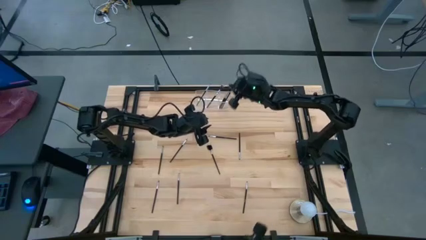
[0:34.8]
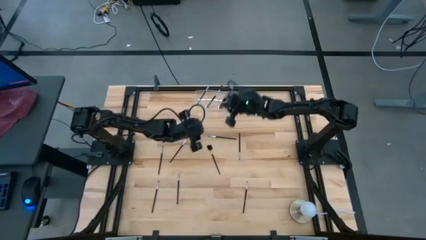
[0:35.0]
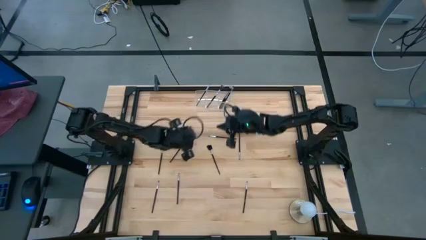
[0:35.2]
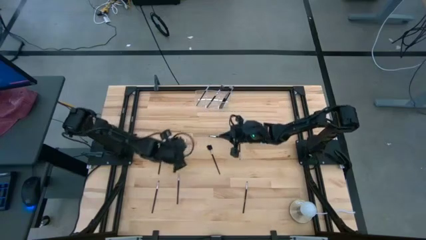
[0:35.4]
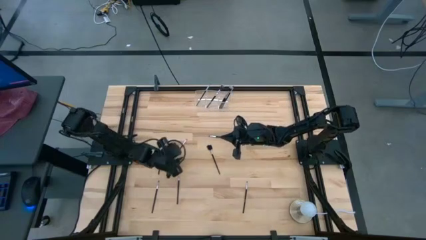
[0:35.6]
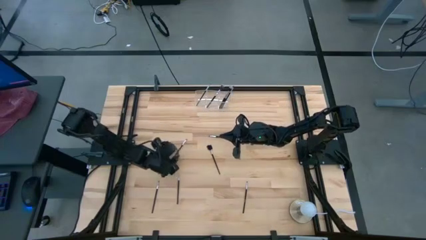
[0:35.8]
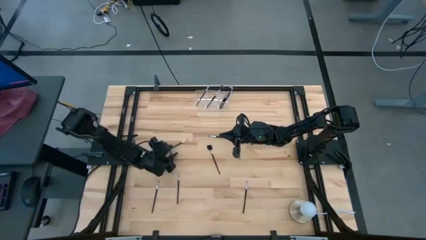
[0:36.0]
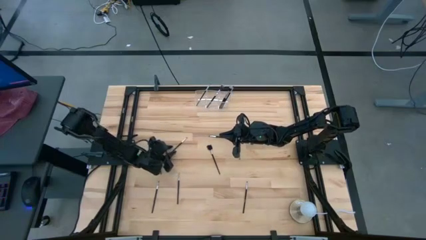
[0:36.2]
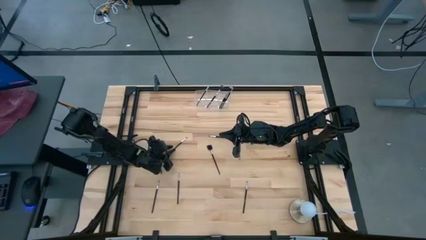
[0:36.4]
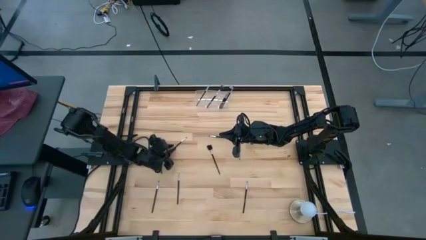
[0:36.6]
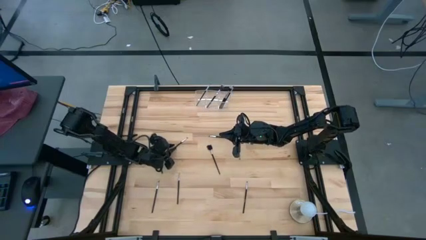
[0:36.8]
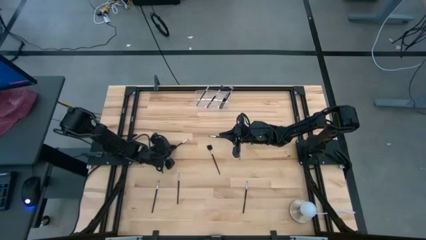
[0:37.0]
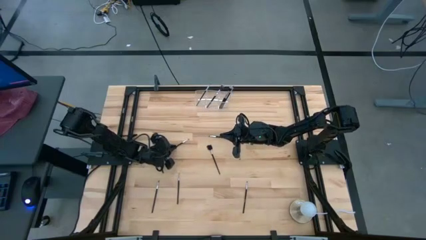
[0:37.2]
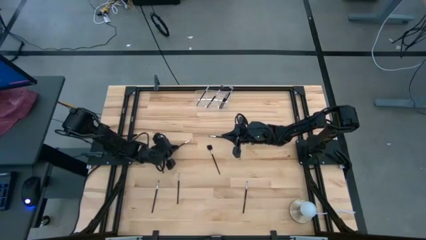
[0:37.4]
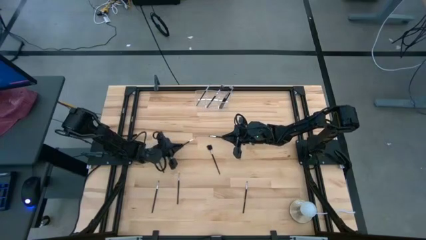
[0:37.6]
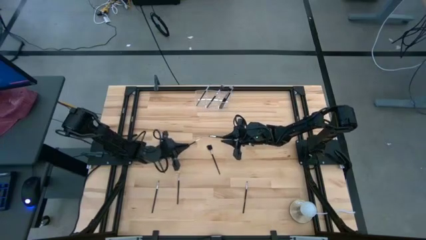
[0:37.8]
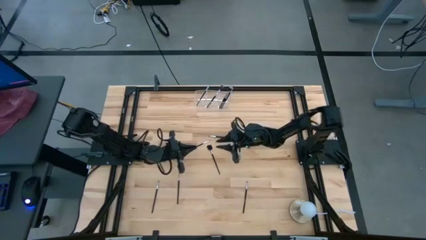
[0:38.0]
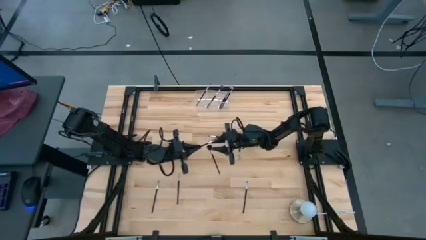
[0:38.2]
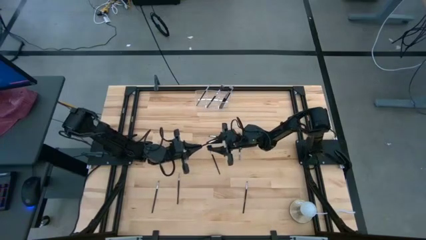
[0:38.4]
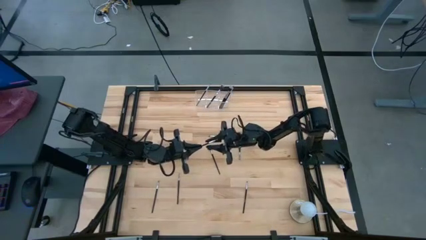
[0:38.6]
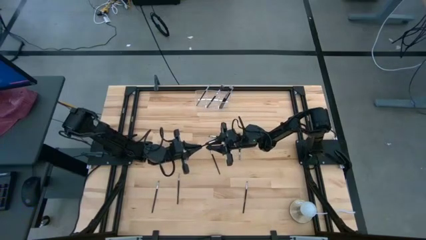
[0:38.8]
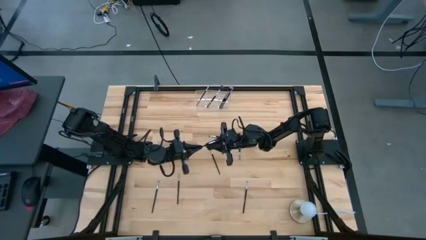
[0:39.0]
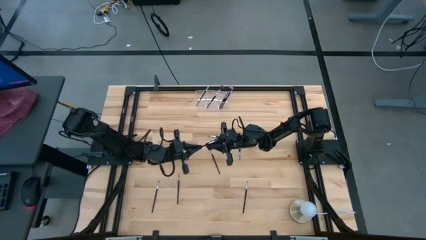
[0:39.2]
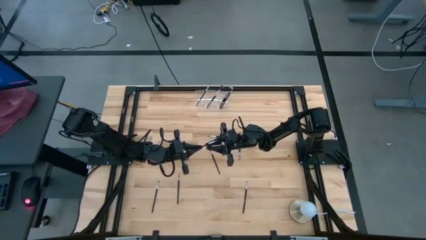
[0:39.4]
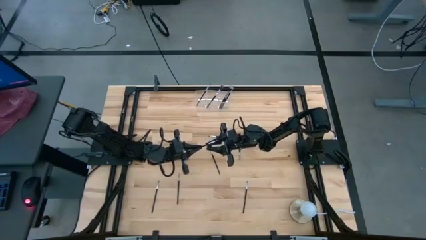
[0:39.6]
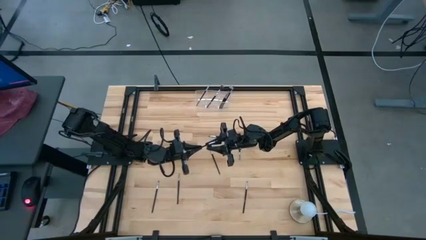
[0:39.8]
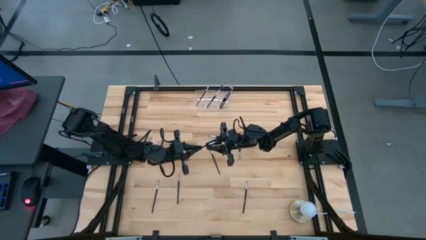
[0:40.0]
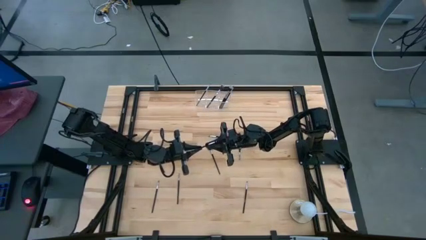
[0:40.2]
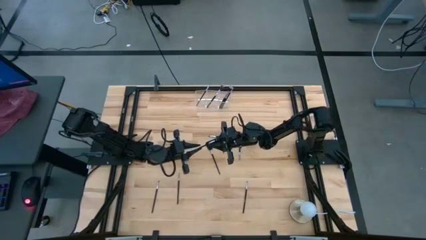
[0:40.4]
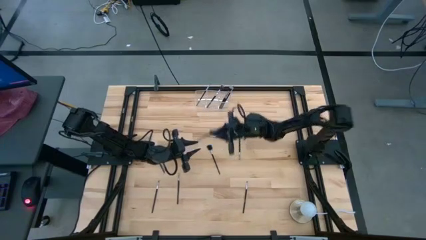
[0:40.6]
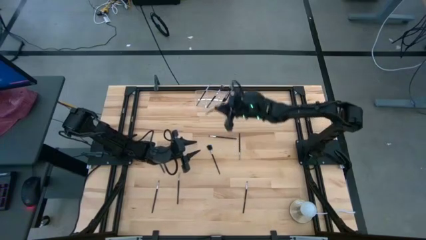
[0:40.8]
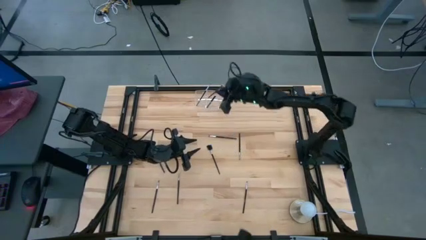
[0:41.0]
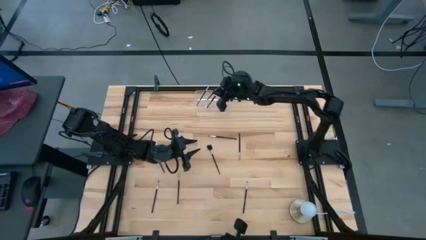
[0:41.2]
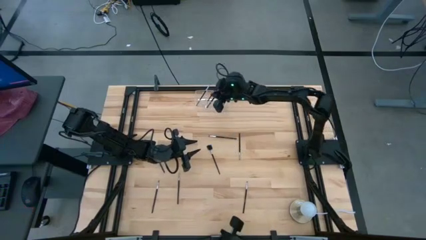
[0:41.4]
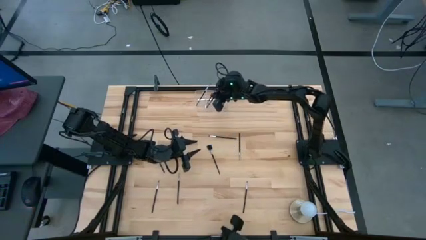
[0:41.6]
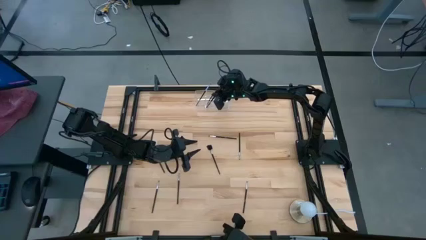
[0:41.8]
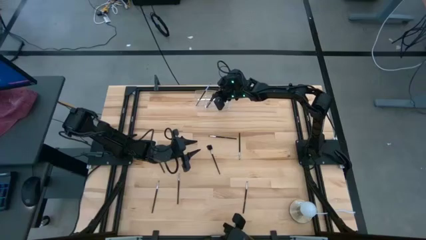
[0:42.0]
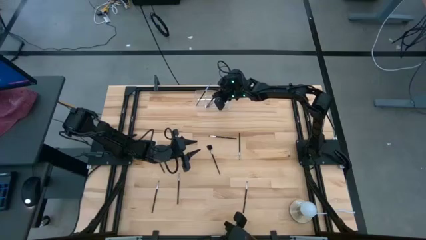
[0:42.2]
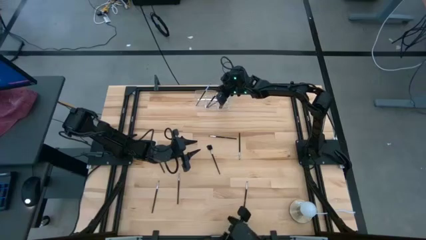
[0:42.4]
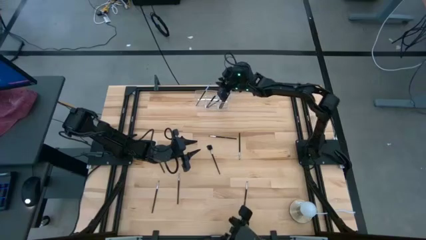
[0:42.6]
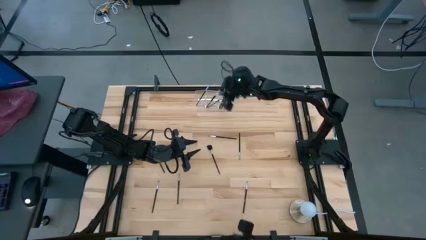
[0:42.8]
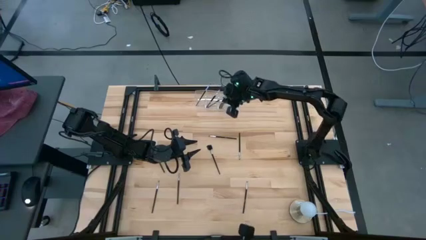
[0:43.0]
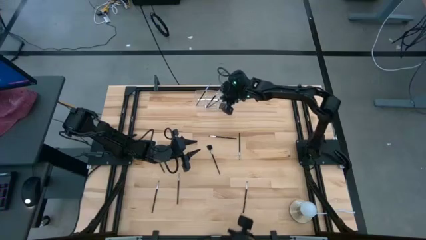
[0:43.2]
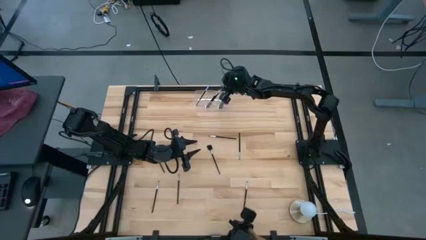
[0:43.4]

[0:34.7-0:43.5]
Task: Put items in baskets/containers
Put the black eyeshadow brush into the transparent organizer

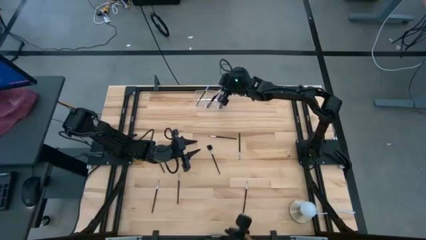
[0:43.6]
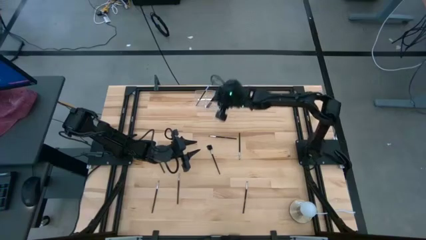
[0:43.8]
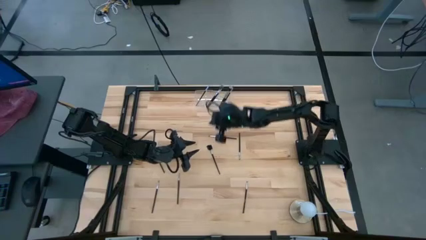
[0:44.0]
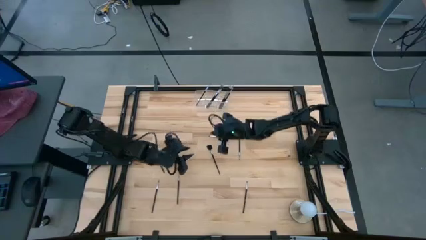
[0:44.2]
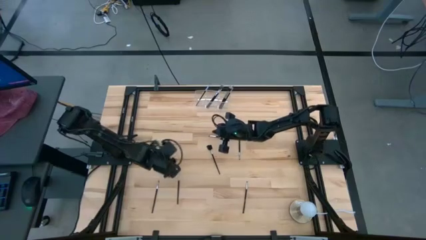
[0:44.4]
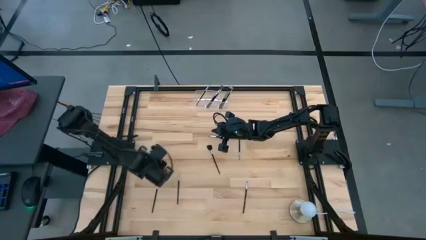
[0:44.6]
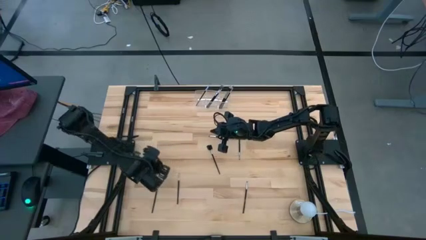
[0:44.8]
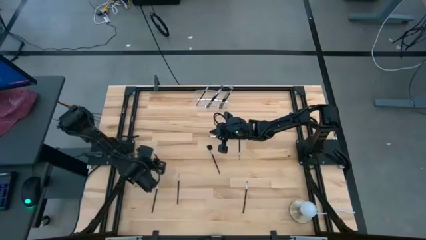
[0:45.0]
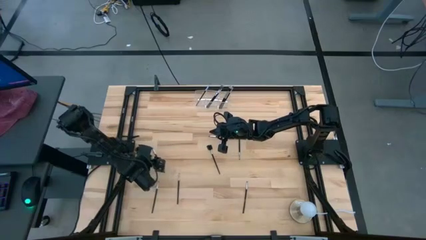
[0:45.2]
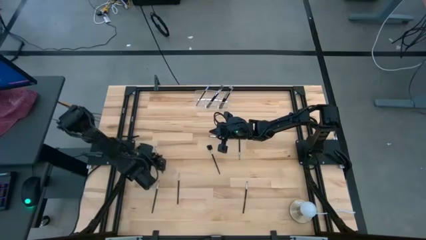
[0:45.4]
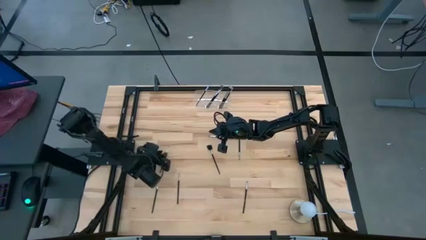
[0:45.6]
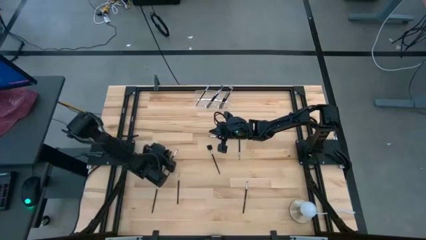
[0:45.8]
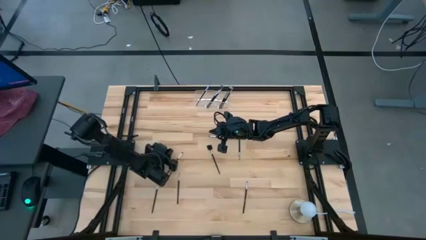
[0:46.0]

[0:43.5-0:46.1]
Put the black eyeshadow brush into the transparent organizer

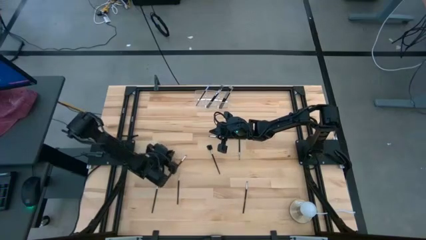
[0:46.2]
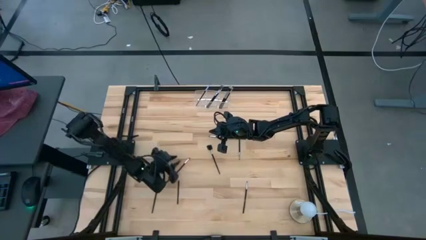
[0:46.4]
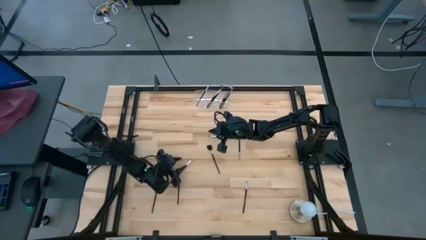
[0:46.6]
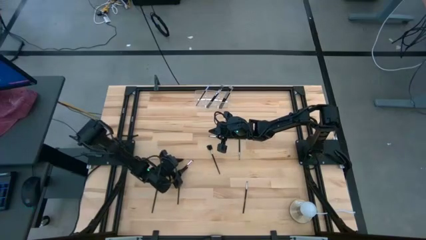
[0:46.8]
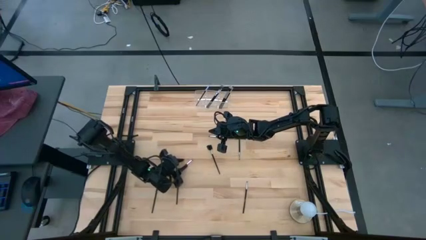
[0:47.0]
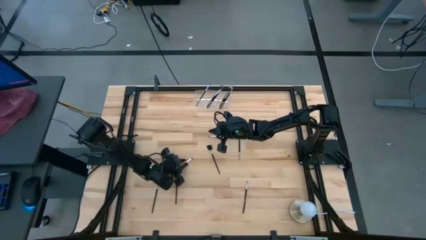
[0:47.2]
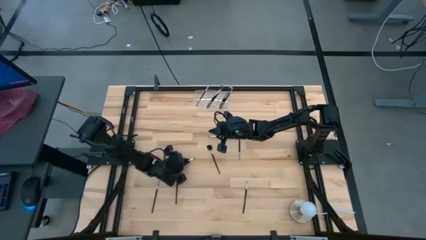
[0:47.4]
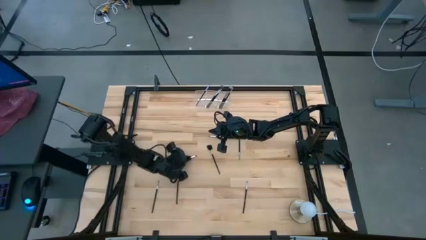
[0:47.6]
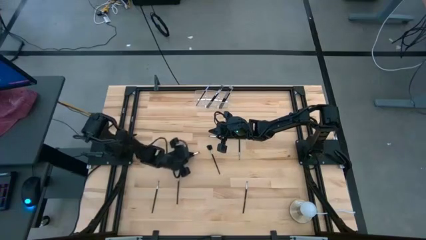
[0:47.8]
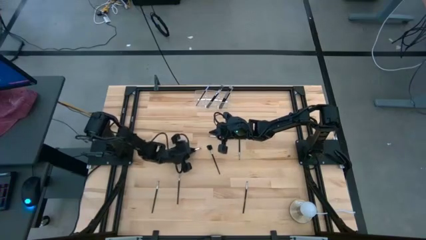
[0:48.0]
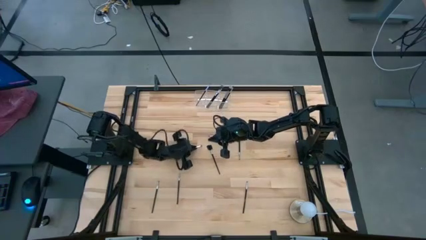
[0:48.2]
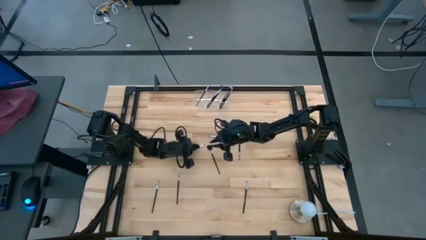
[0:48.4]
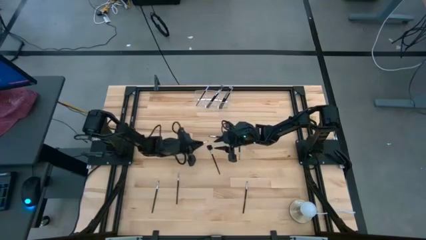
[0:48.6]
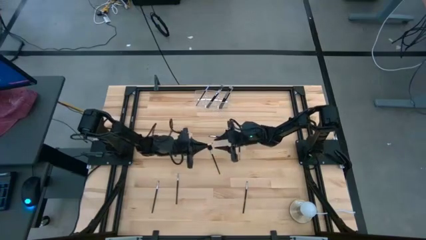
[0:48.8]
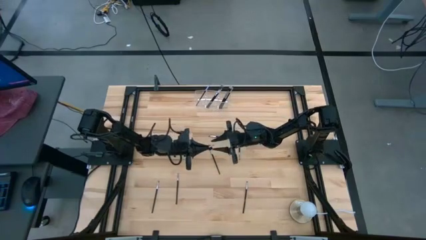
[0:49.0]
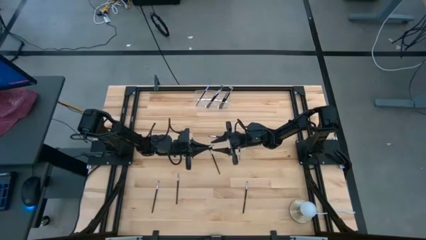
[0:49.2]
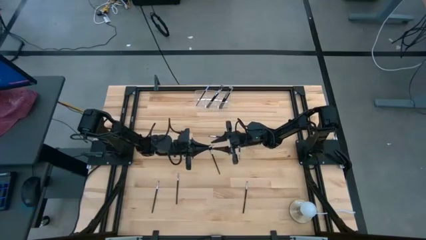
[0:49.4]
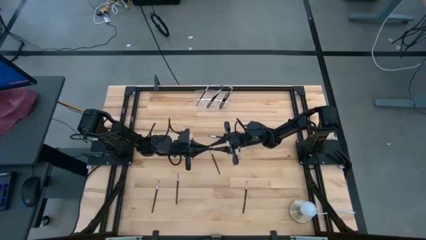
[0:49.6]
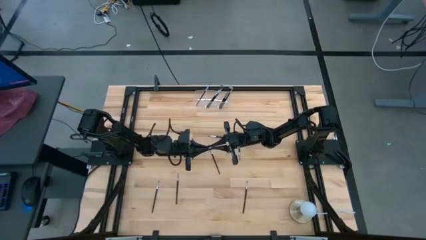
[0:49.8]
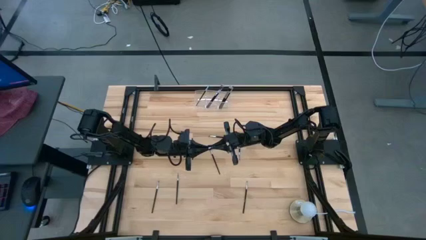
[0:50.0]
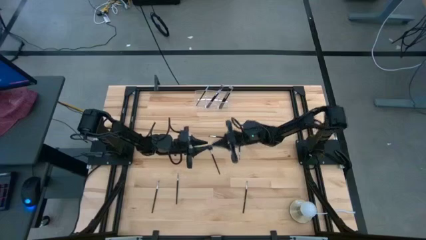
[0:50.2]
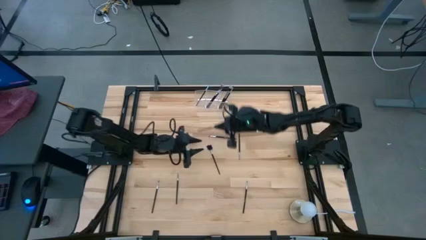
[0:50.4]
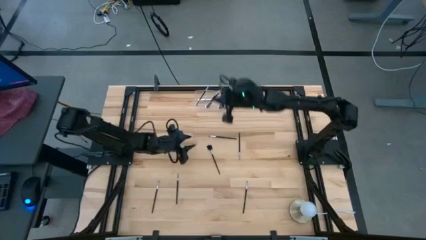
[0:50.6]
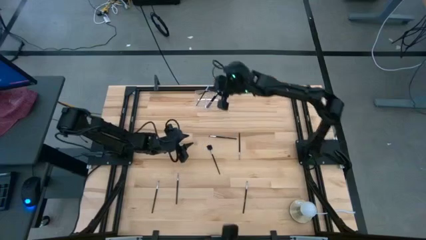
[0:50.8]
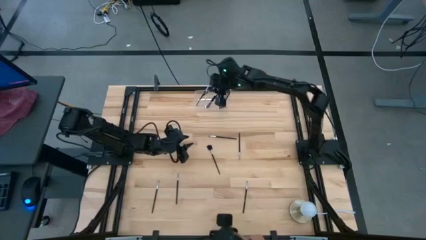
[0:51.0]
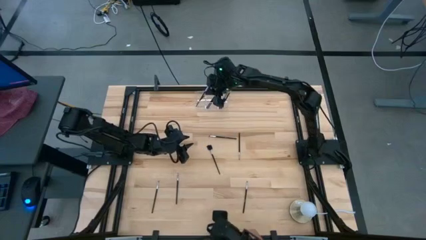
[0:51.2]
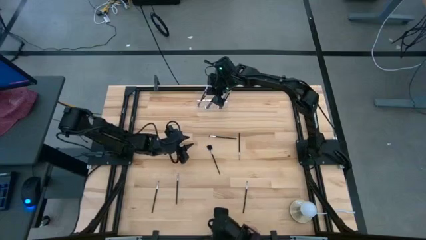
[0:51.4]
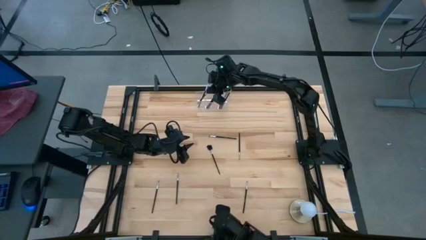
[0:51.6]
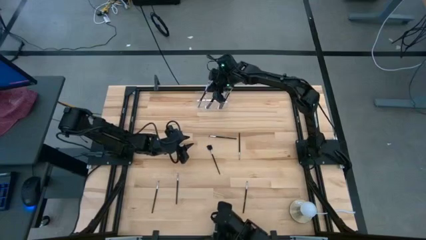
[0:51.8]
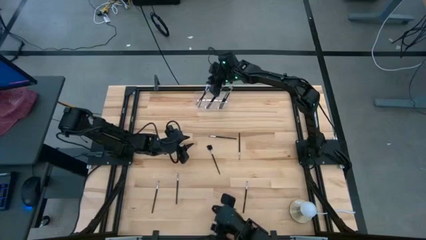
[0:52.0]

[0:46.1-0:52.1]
Put the black eyeshadow brush into the transparent organizer
